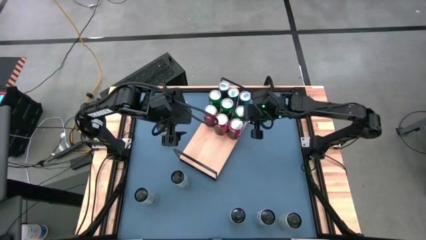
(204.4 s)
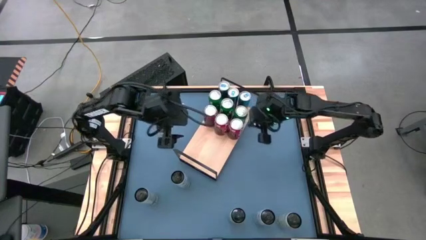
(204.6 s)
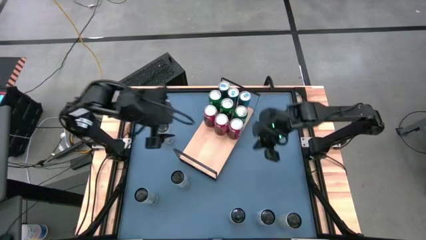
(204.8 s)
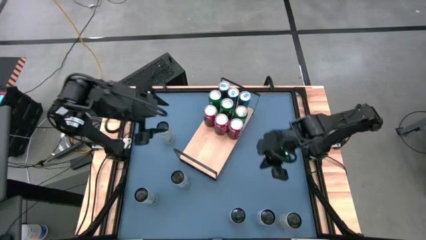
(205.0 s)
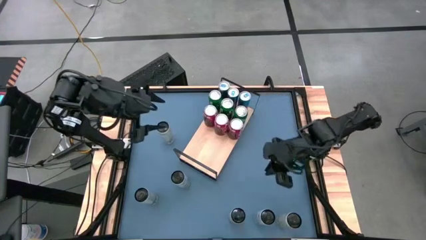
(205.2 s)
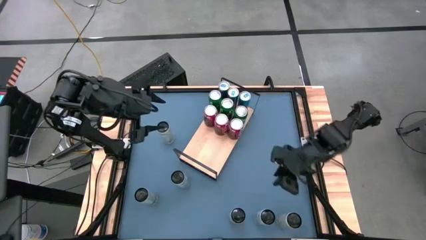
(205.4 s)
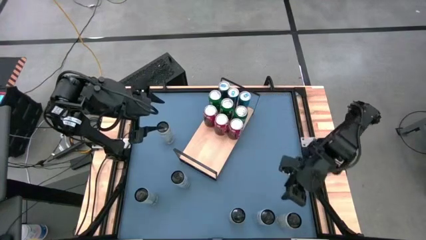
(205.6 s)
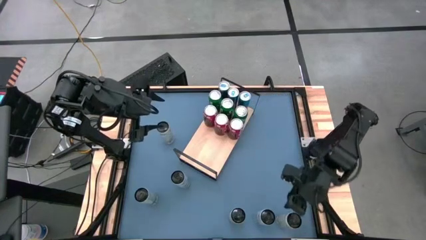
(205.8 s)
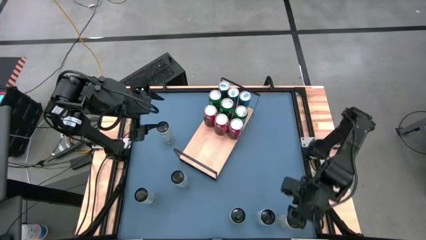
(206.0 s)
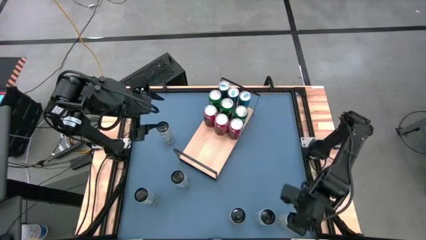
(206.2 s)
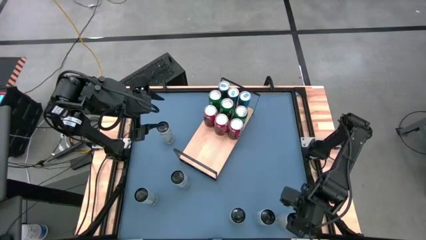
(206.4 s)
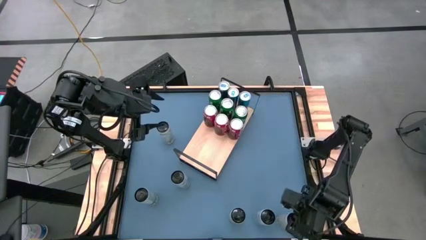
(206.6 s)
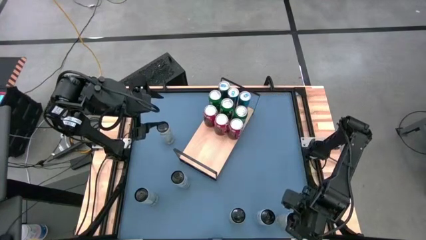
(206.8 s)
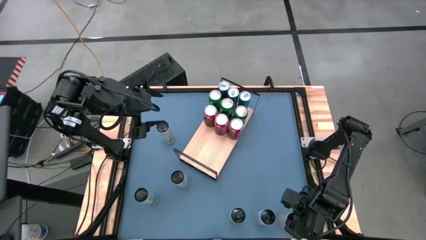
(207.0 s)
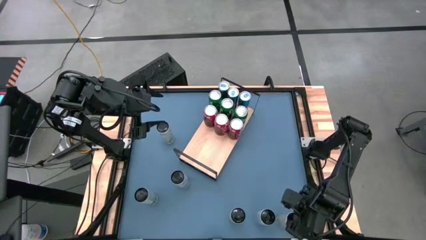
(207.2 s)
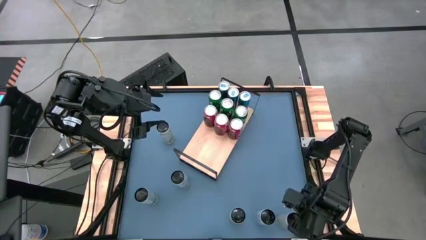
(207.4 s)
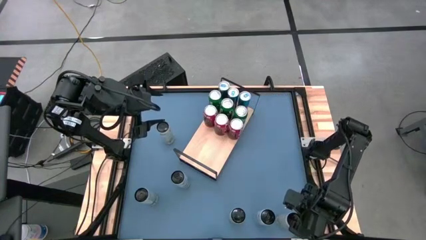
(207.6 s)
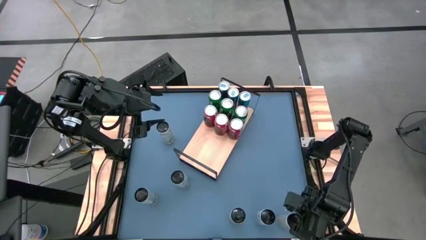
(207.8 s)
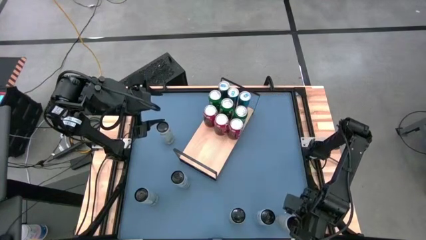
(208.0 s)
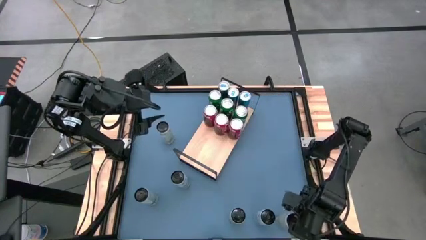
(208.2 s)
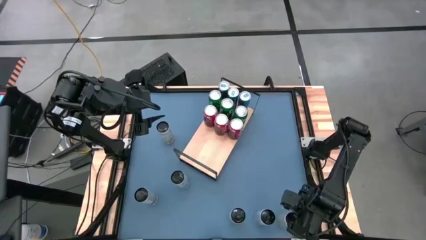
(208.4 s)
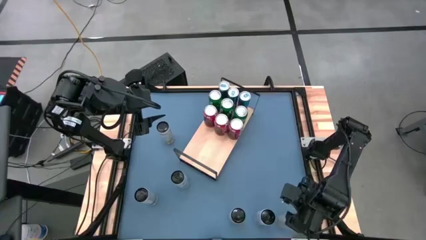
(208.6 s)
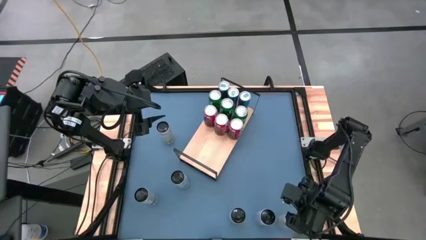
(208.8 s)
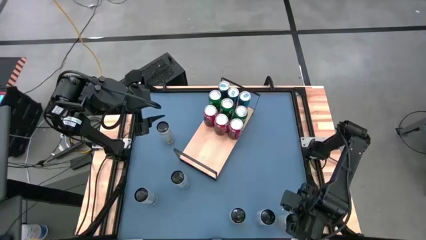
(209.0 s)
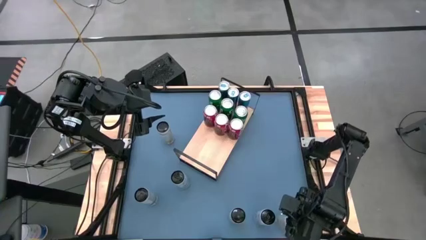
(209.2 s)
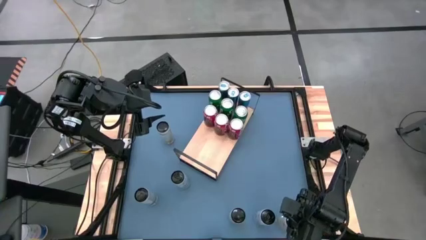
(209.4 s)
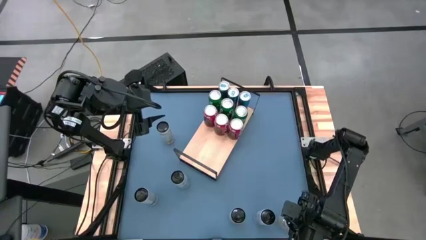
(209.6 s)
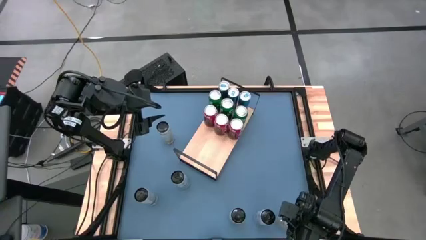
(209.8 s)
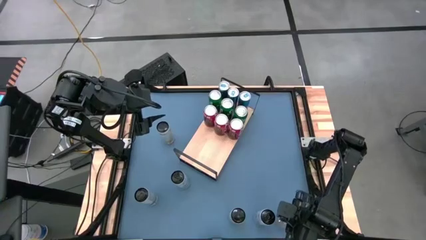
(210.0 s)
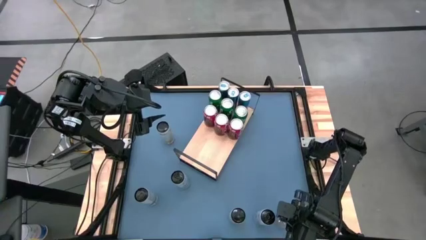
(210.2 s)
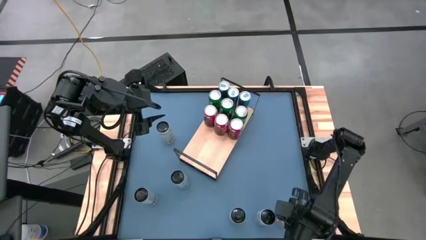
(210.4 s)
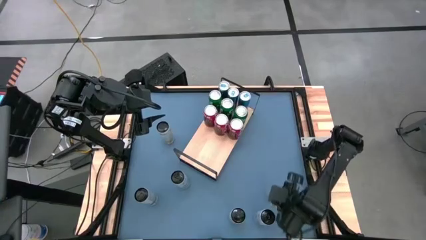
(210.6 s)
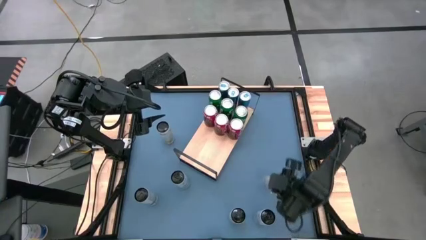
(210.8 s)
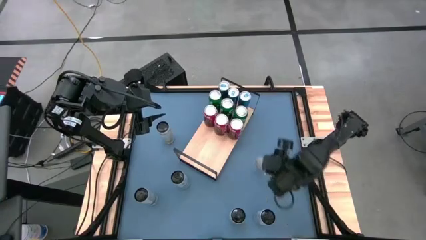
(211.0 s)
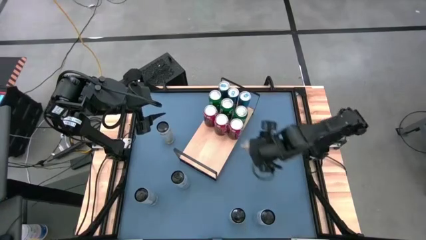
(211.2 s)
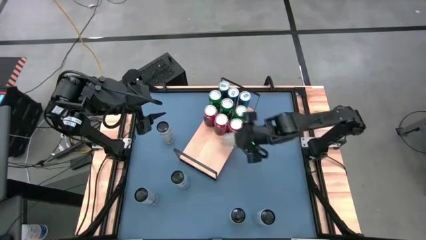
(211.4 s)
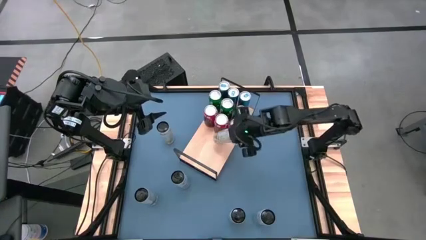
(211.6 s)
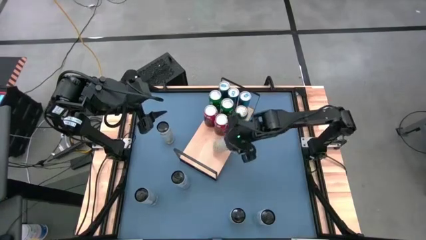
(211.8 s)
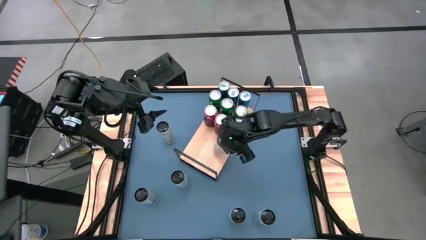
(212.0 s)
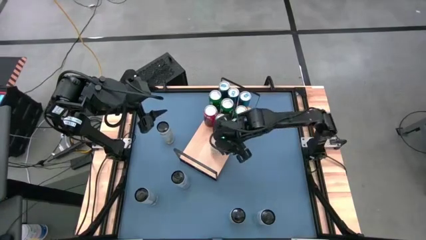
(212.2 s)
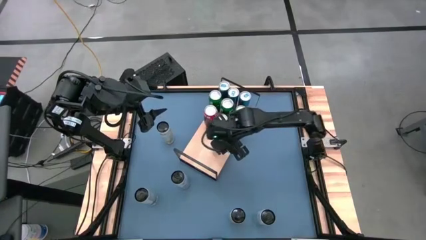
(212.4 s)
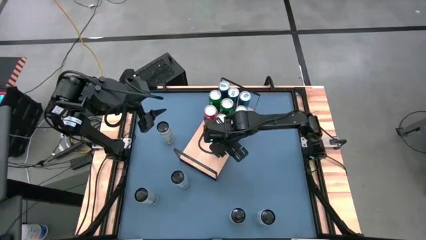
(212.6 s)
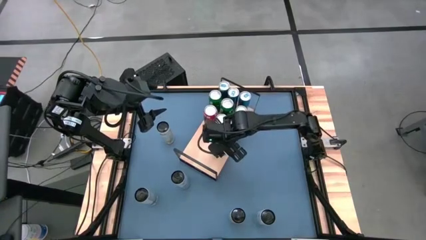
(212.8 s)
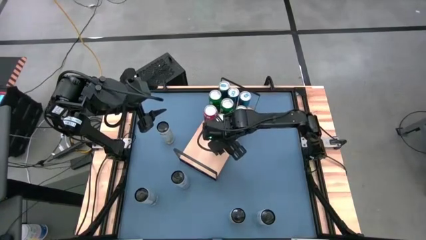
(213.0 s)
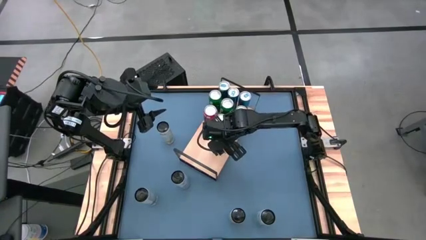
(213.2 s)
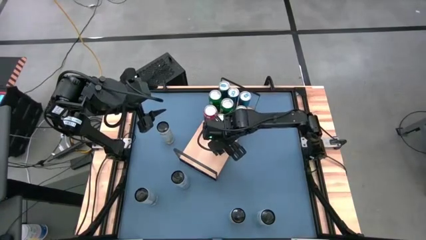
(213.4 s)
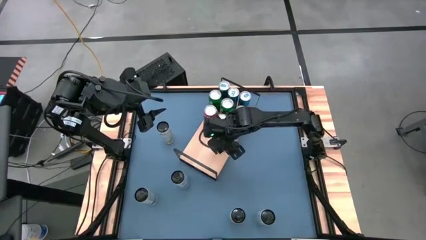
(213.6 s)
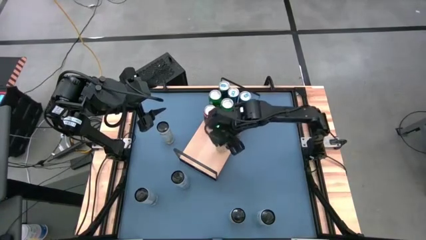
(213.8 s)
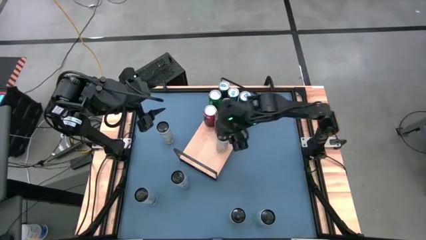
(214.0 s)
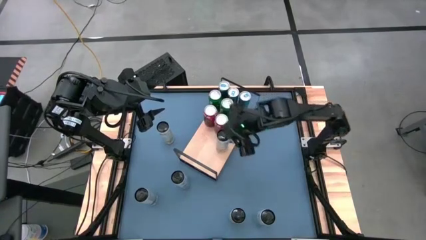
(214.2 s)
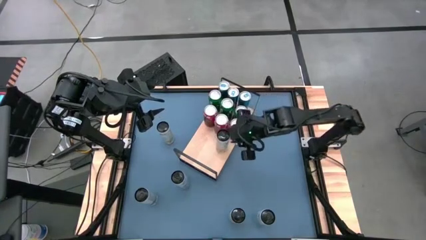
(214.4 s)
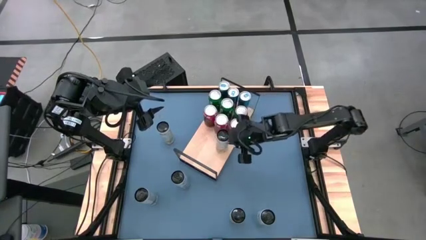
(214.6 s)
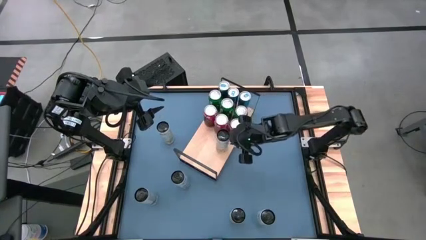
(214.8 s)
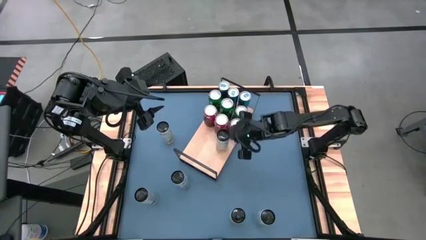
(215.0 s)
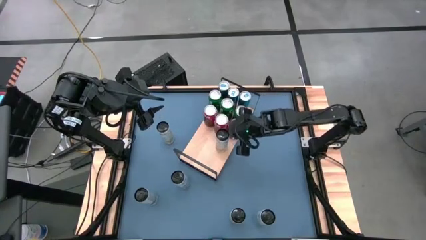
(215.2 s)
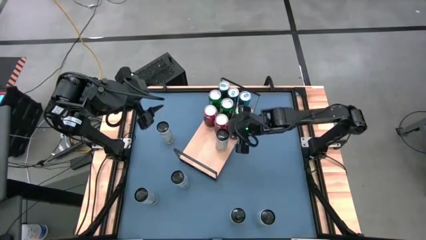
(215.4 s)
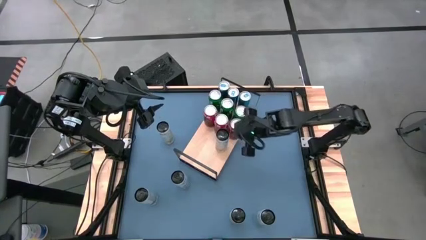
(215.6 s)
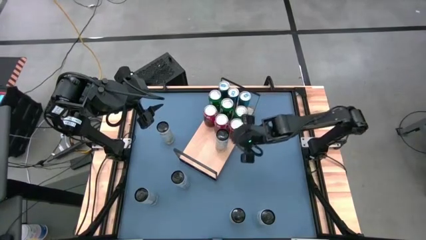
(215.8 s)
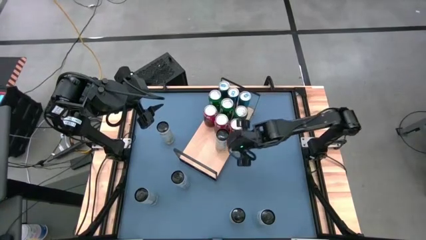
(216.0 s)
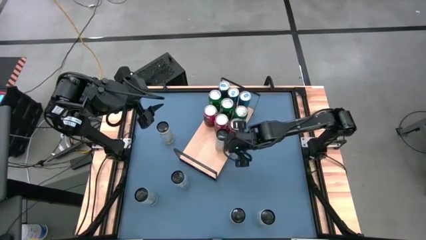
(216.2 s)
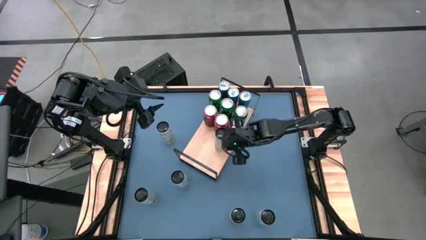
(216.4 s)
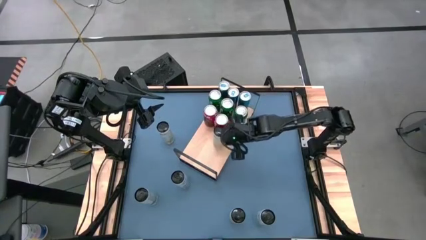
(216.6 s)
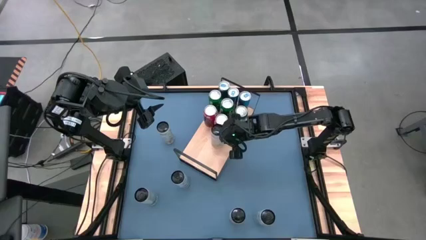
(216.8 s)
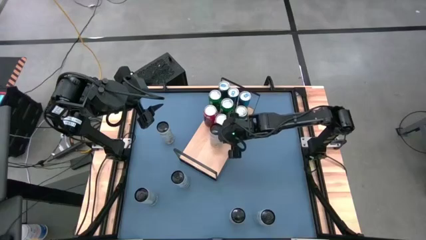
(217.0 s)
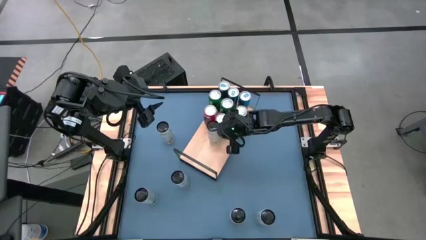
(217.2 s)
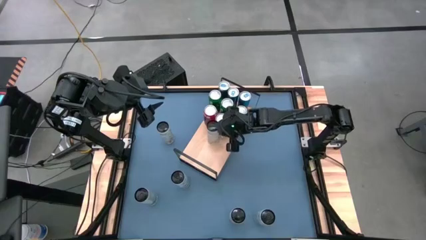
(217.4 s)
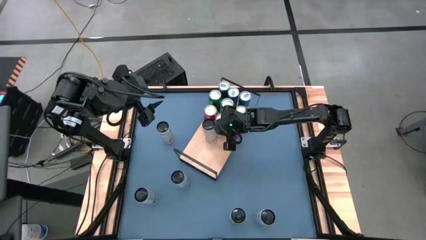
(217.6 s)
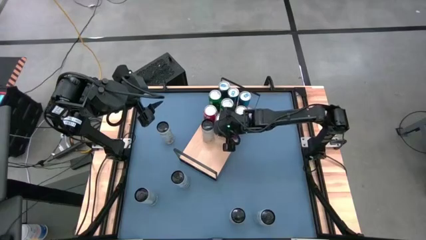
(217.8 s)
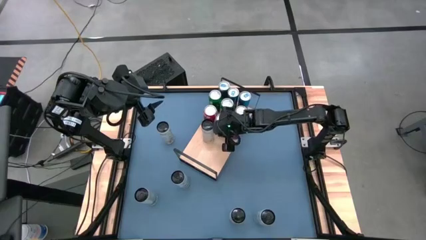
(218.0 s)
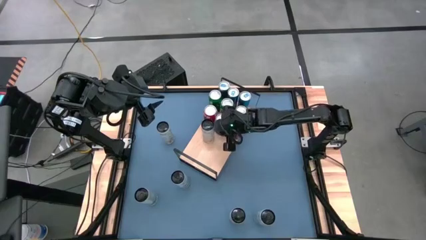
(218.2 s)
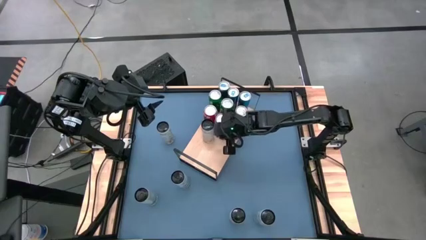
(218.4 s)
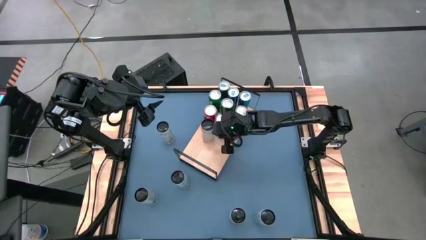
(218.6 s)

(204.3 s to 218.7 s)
Task: Place canned beverage on shelf
Put the right white yellow soda can on the shelf
